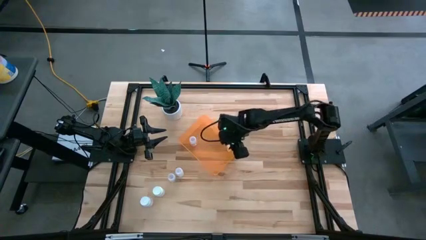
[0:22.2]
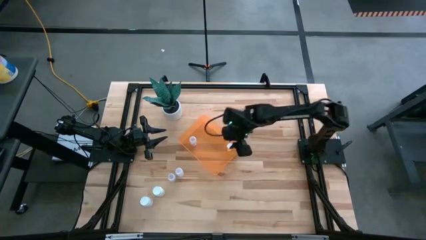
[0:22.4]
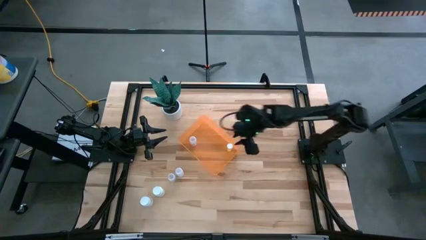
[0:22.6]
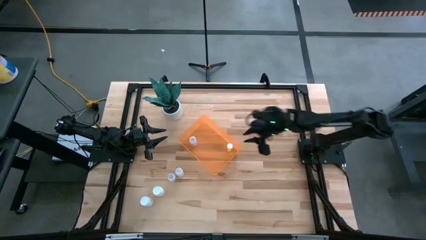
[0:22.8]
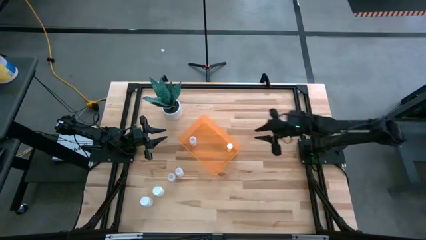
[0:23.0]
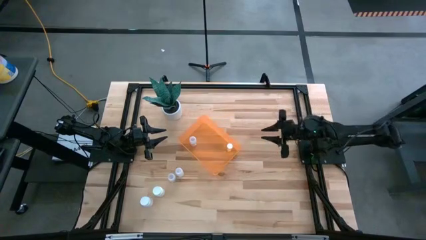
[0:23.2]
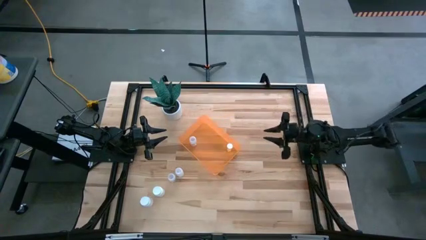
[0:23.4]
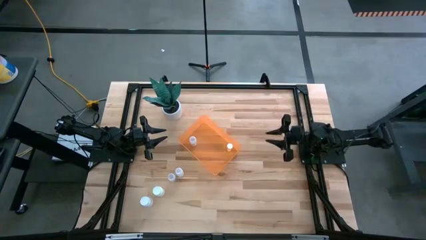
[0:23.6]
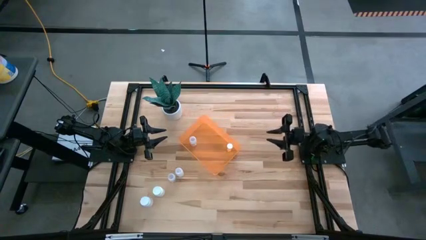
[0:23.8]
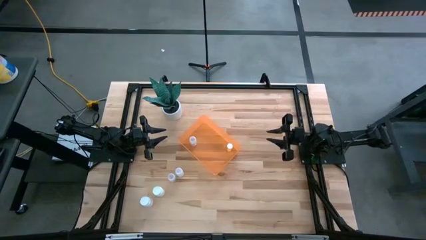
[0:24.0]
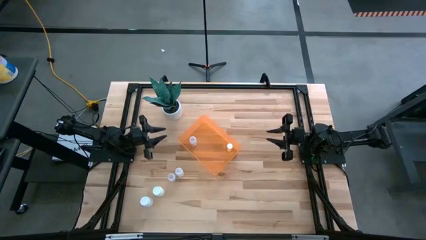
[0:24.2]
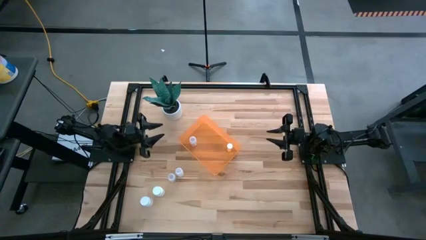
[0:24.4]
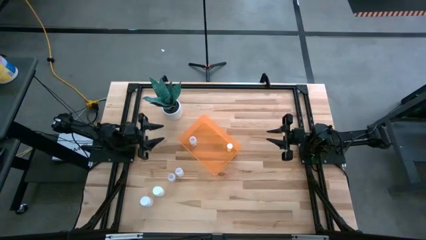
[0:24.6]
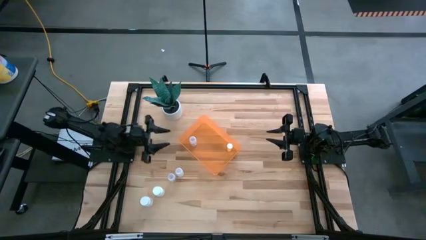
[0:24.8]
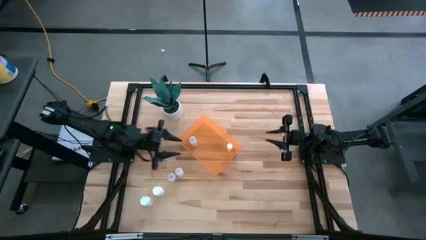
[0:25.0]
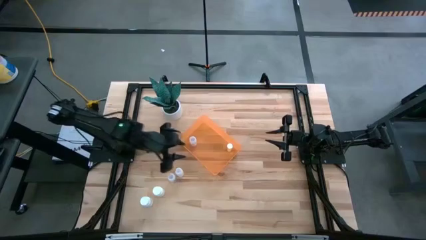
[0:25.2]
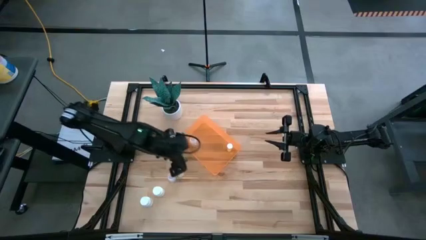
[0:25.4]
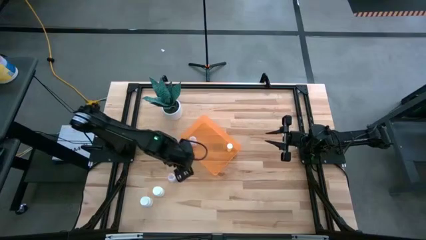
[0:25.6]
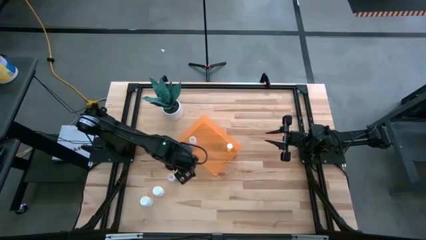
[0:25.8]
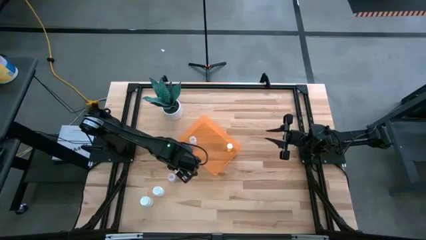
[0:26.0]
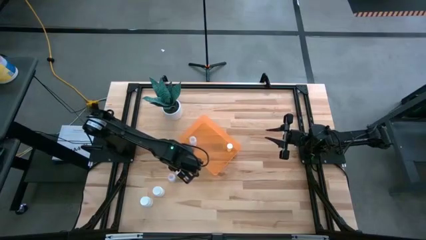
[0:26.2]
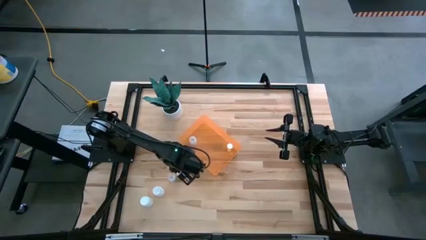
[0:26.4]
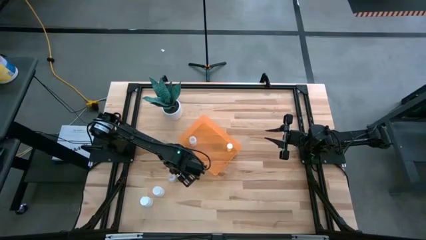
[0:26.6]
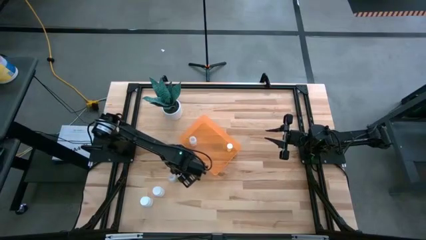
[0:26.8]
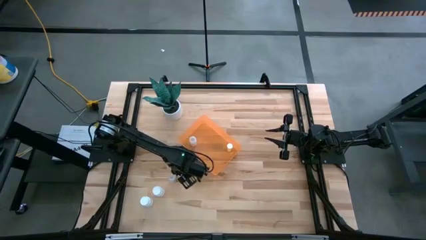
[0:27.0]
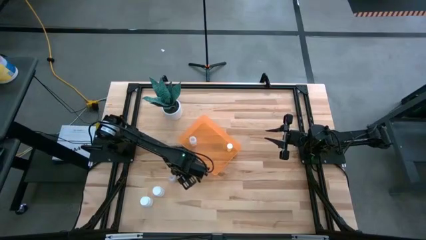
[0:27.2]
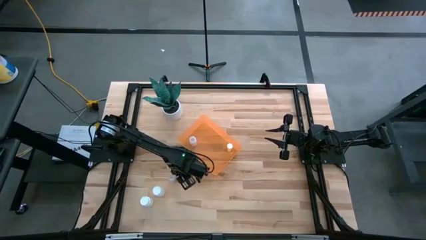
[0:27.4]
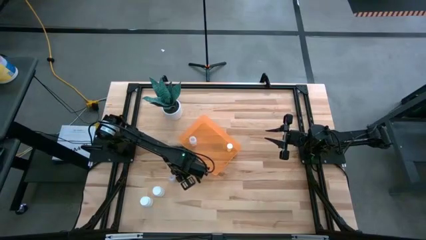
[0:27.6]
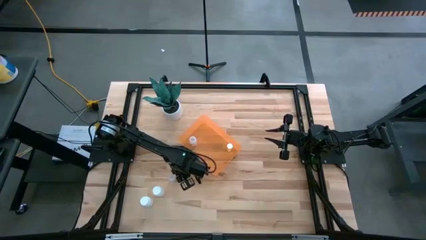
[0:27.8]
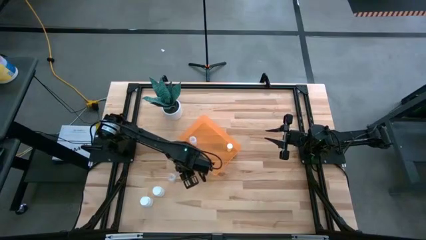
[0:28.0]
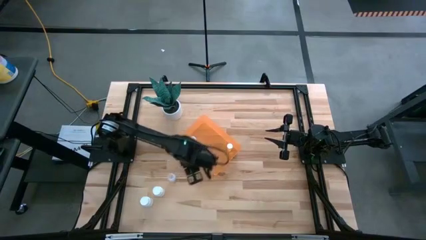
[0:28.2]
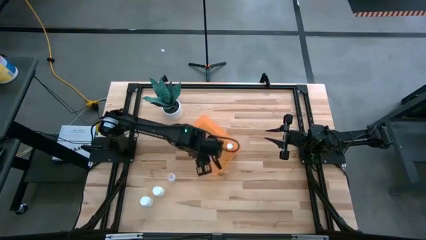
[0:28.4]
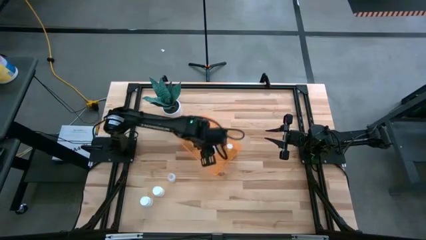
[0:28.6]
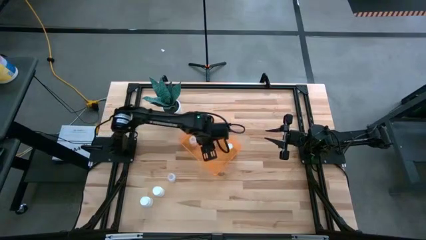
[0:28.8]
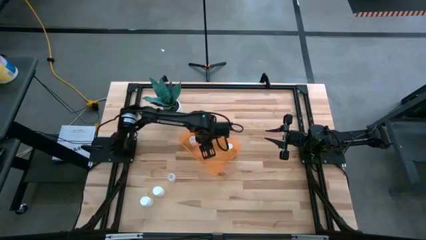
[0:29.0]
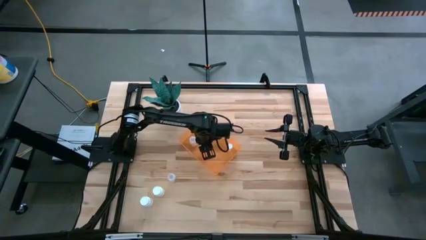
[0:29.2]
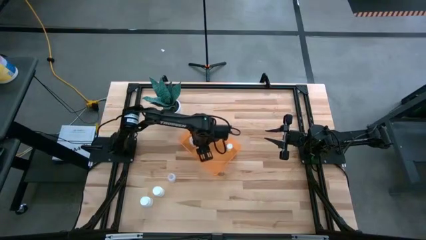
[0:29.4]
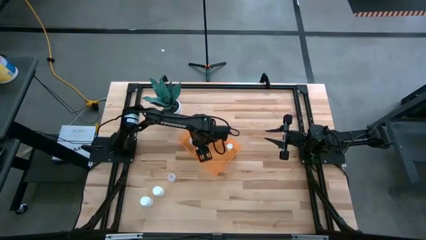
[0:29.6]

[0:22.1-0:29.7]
Task: Pick and place pill bottles into a basket
Put the top transparent bottle into the orange container

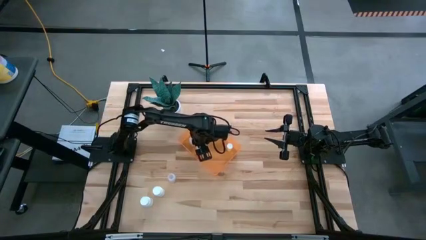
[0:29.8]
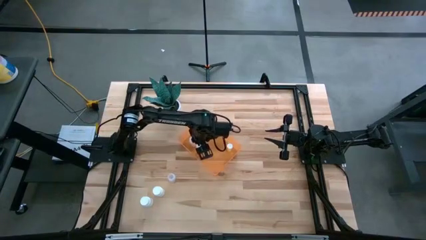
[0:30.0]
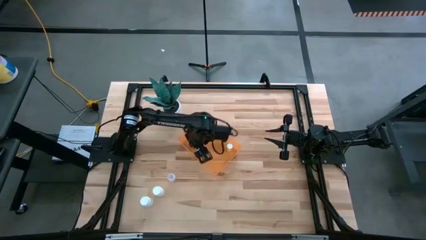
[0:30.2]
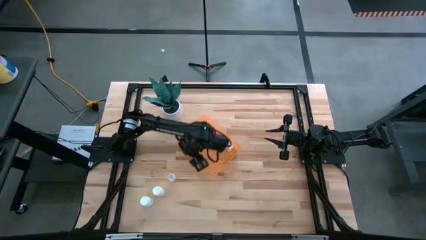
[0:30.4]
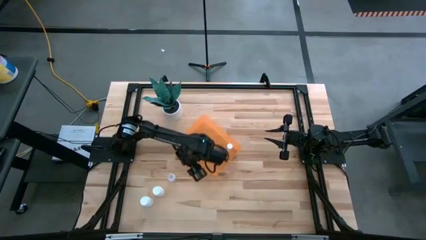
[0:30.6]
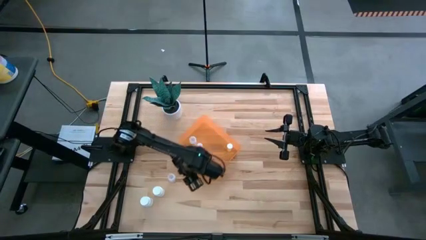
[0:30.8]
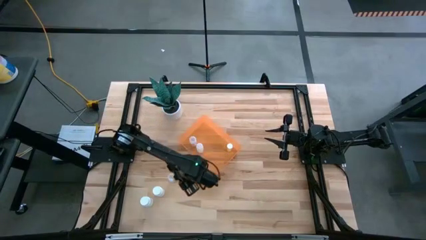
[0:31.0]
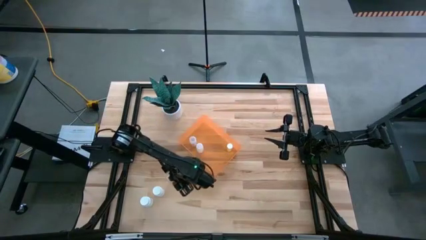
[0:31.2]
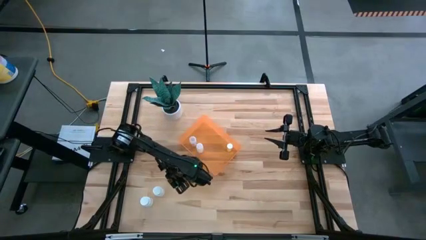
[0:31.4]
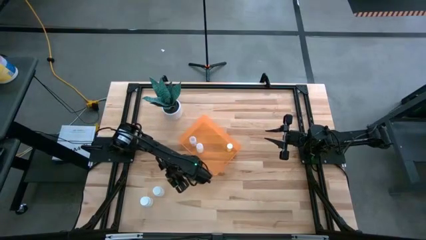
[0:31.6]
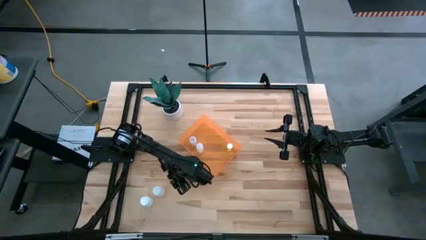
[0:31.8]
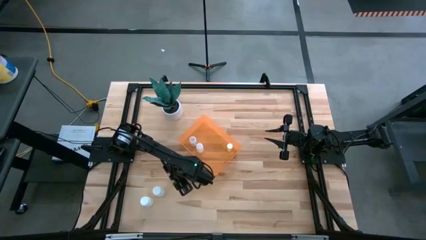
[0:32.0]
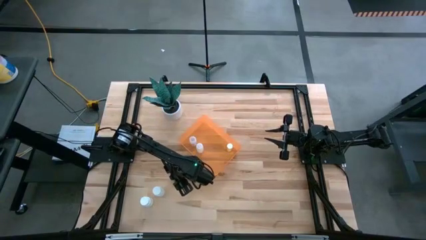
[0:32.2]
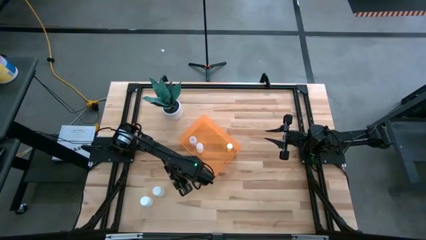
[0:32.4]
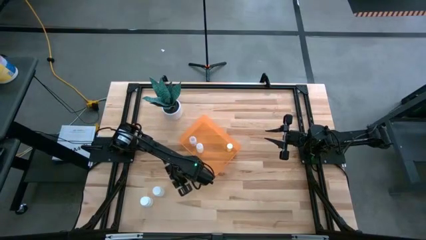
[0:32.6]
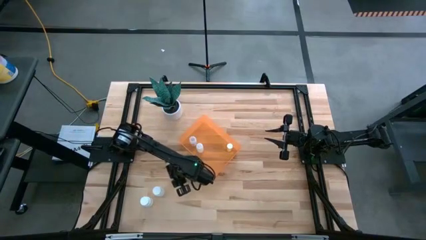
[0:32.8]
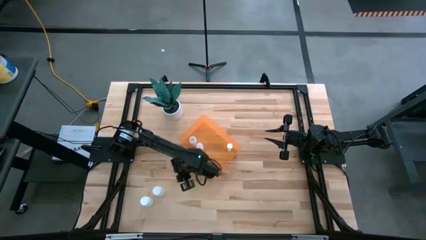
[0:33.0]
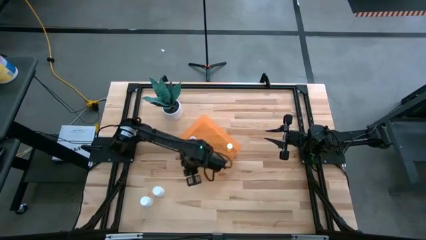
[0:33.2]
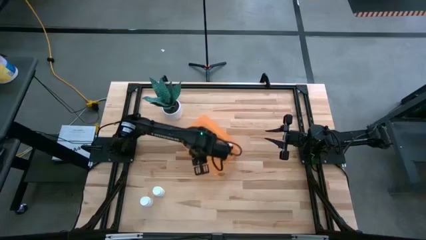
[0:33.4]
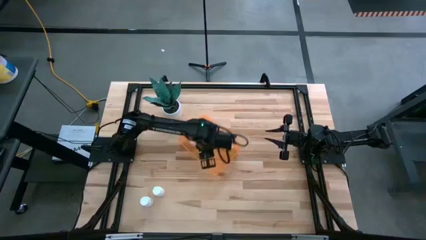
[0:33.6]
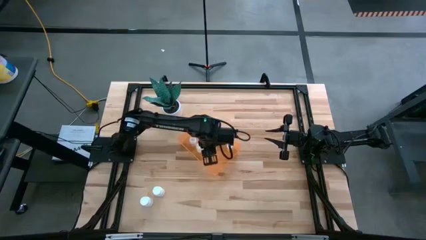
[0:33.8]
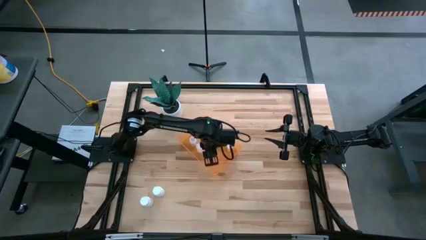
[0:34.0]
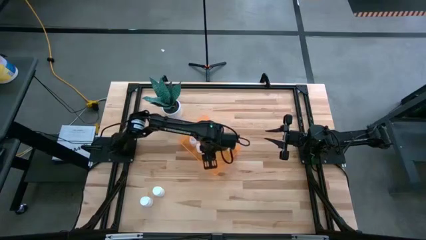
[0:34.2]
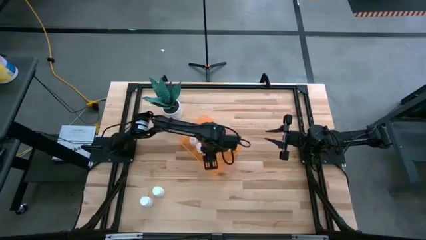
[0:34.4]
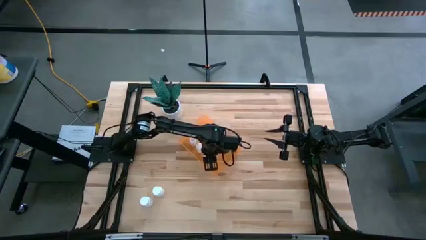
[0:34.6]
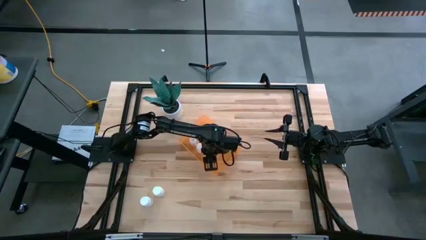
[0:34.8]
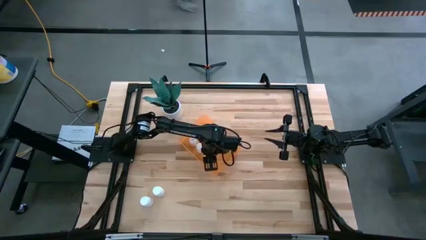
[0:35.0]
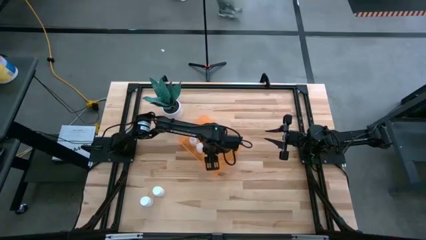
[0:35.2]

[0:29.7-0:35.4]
Put the transparent bottle into the orange container

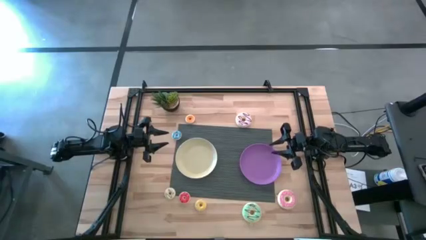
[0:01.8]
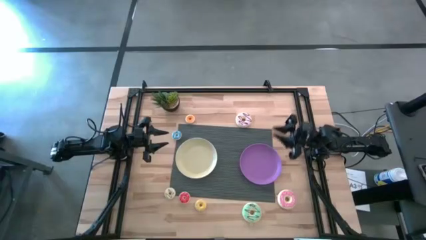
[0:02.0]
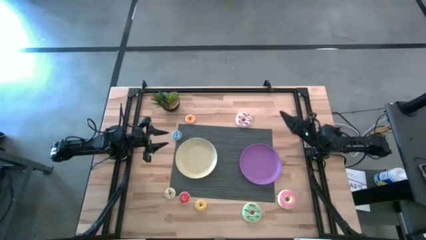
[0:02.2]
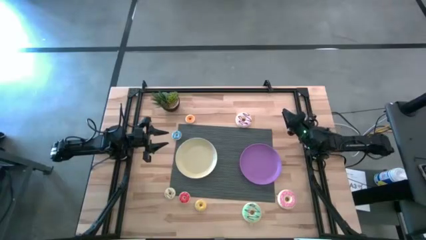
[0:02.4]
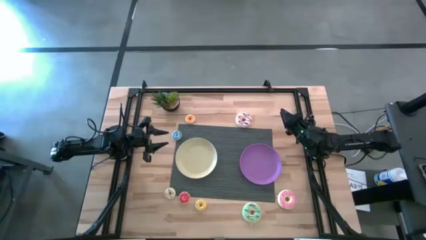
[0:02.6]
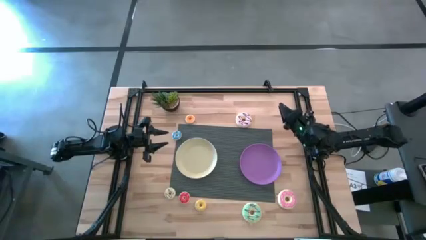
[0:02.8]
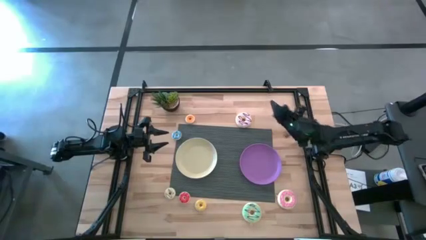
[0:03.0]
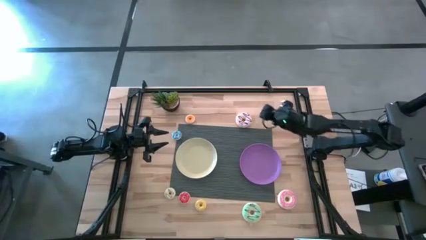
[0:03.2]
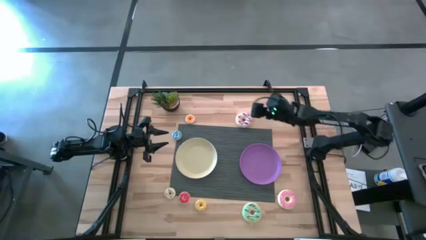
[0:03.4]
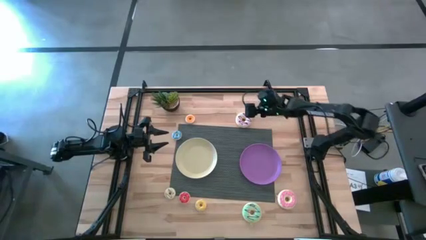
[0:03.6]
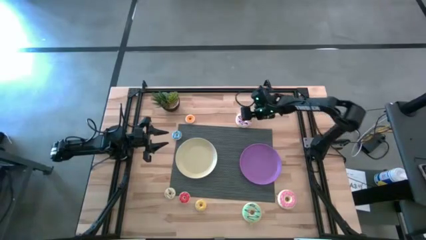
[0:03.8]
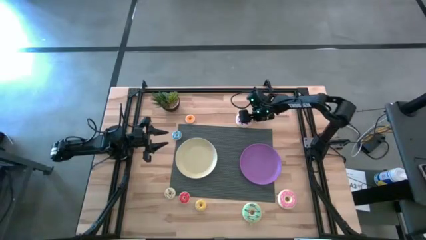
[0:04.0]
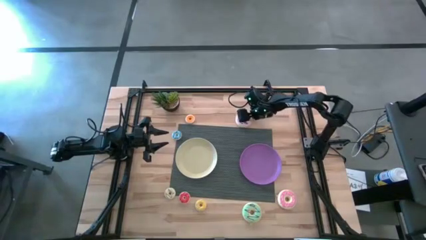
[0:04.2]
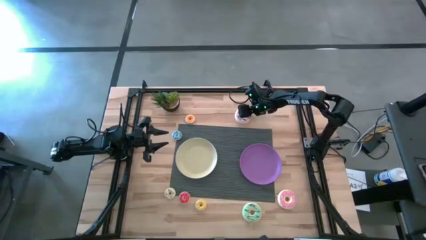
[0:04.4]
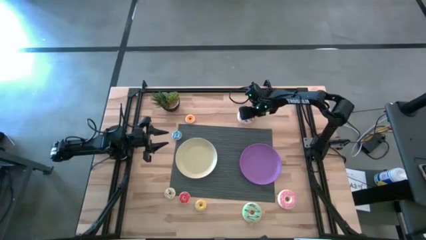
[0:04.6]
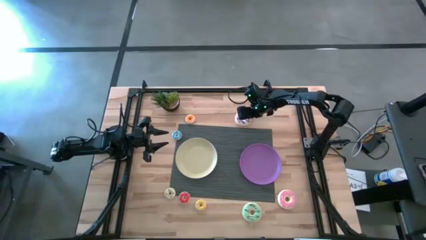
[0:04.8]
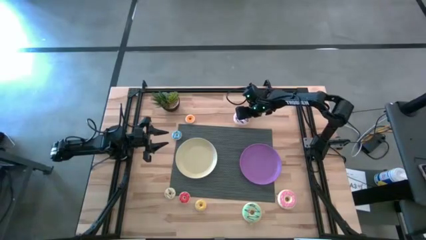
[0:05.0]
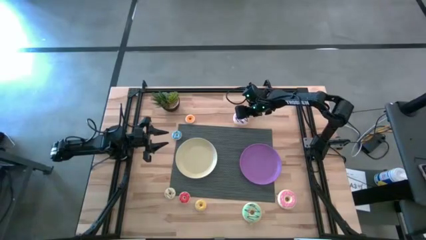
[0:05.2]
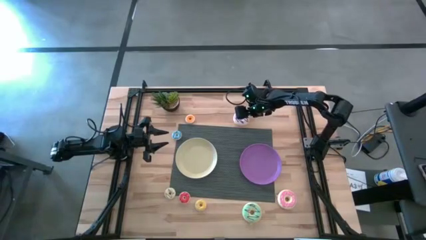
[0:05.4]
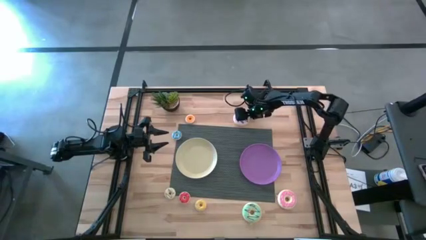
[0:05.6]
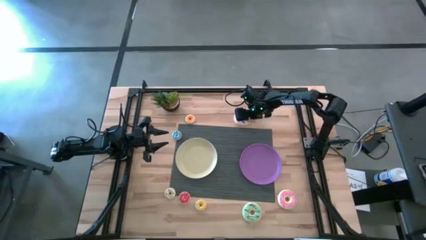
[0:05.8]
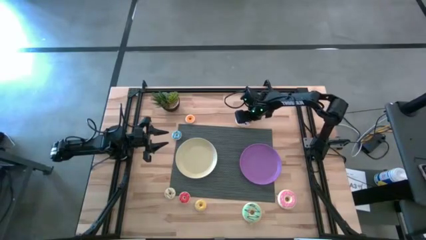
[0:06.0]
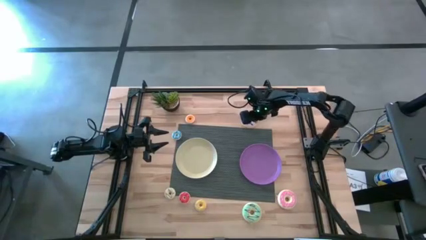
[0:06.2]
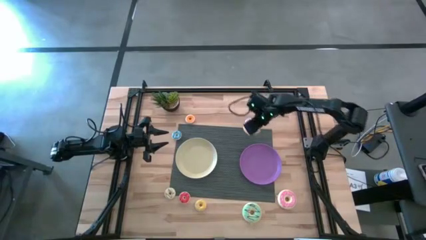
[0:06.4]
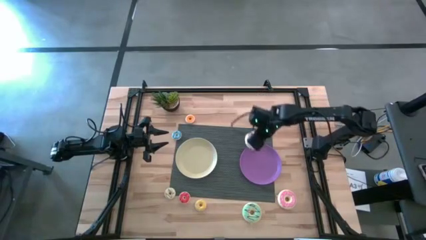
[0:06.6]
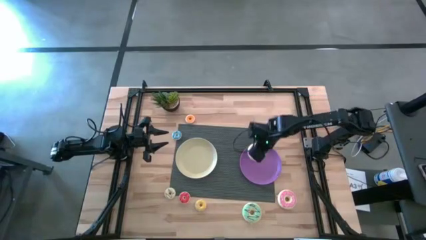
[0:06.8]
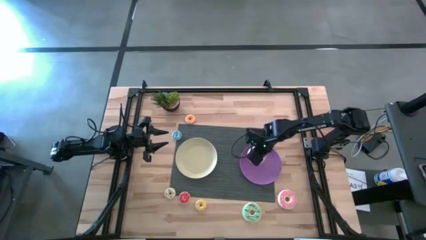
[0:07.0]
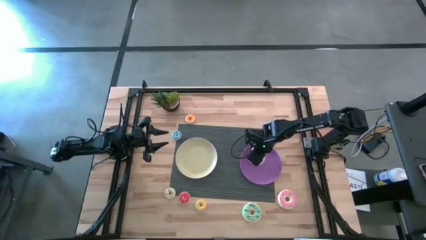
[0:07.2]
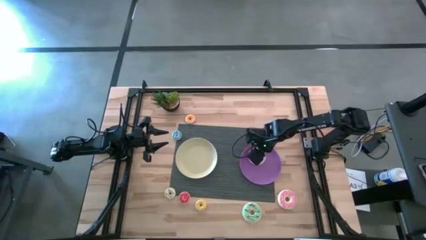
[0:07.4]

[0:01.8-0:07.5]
Task: Pick & Place donuts
Put the large purple donut on the purple plate
